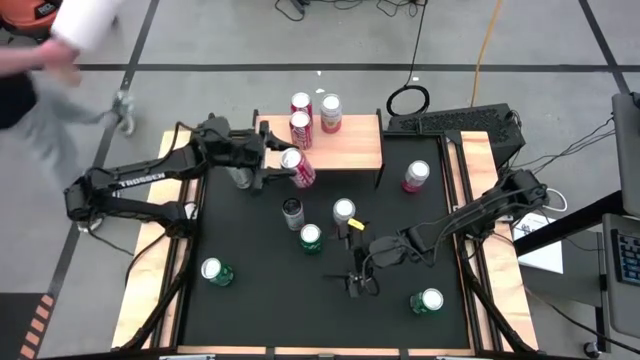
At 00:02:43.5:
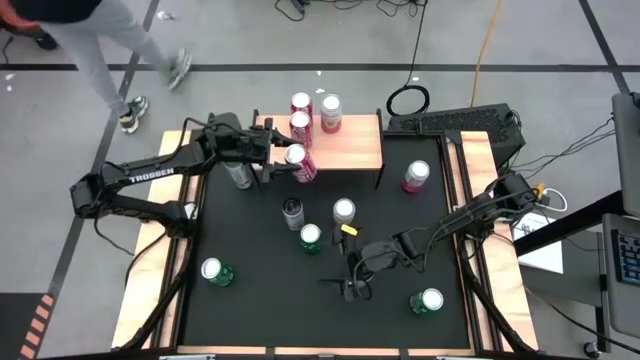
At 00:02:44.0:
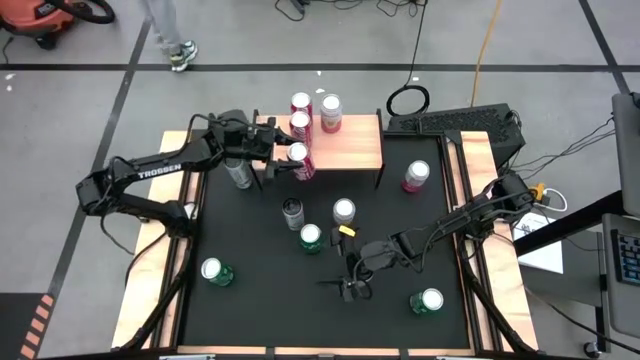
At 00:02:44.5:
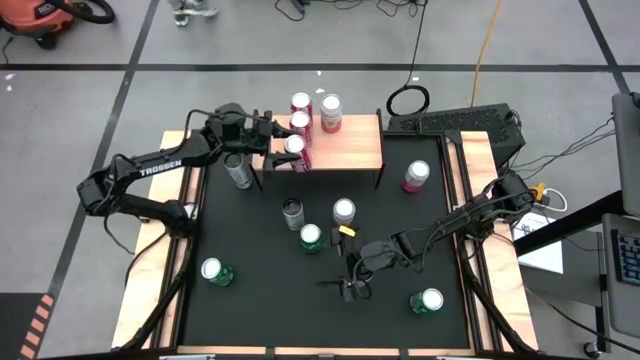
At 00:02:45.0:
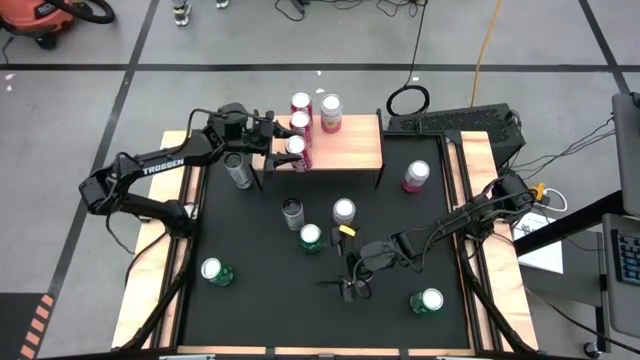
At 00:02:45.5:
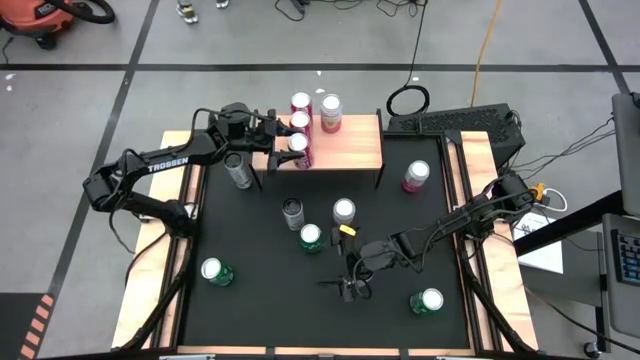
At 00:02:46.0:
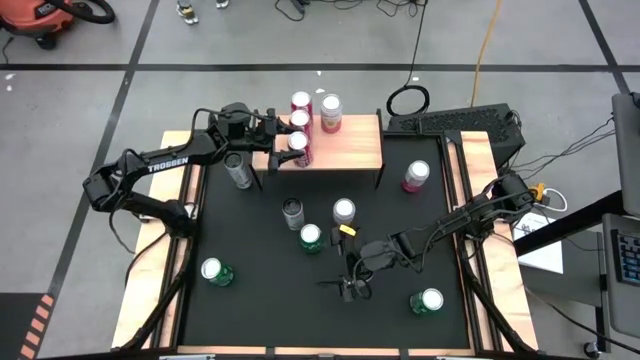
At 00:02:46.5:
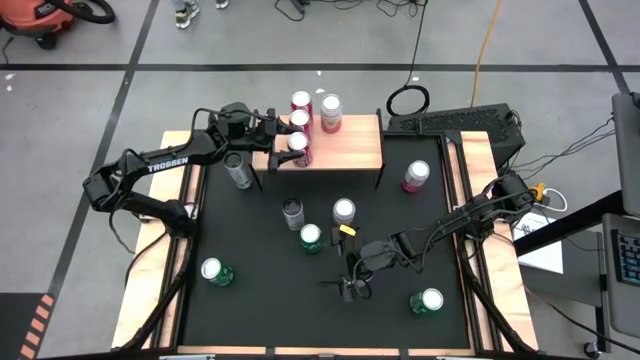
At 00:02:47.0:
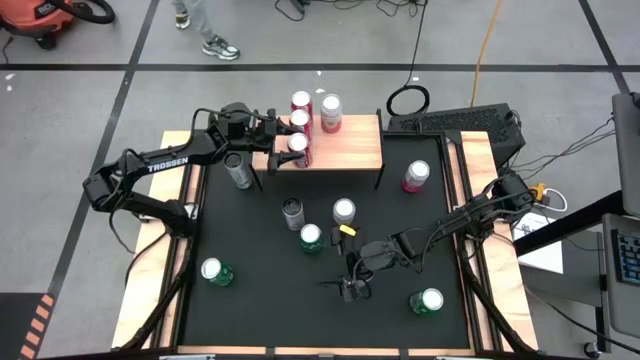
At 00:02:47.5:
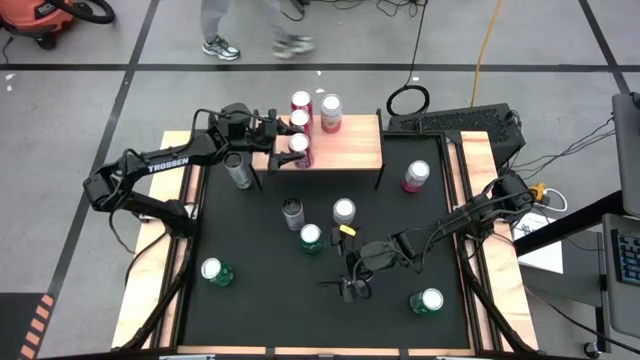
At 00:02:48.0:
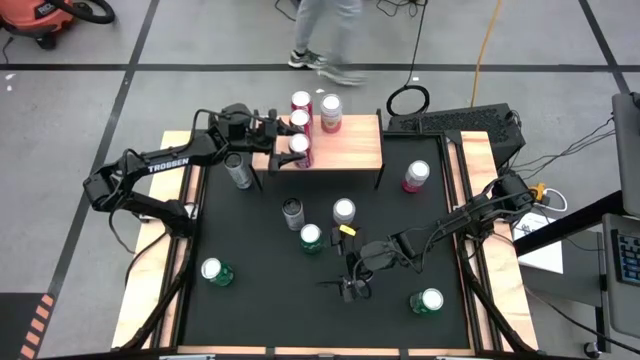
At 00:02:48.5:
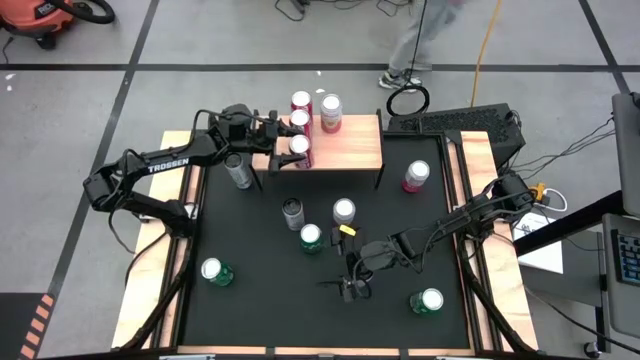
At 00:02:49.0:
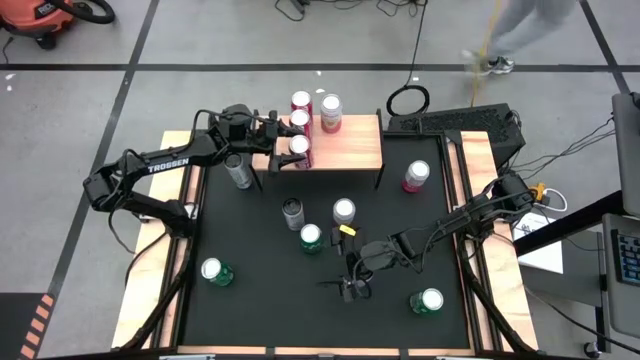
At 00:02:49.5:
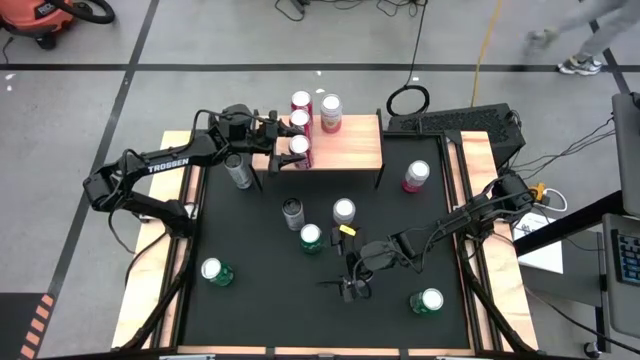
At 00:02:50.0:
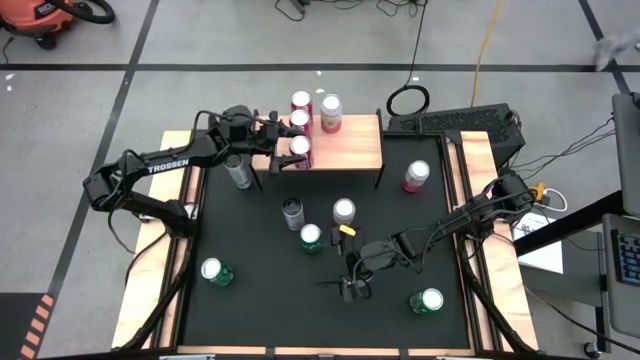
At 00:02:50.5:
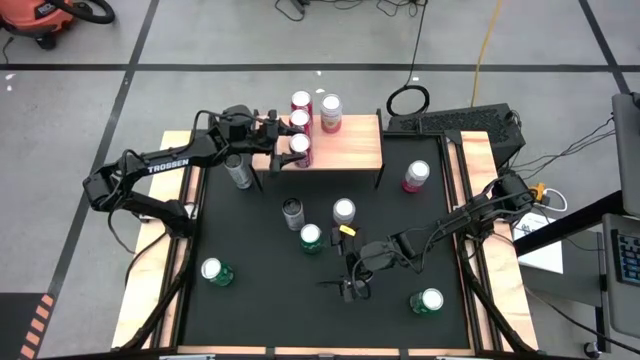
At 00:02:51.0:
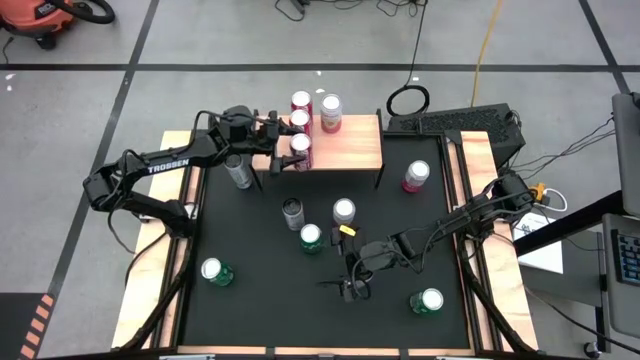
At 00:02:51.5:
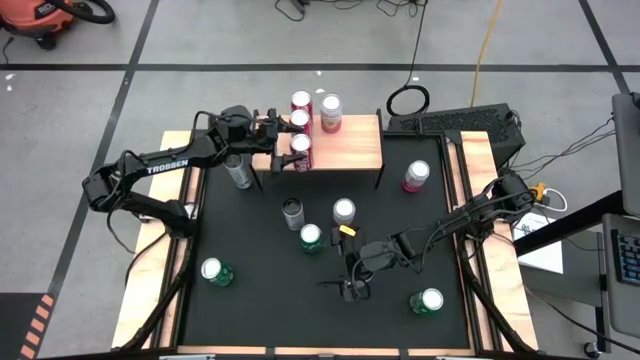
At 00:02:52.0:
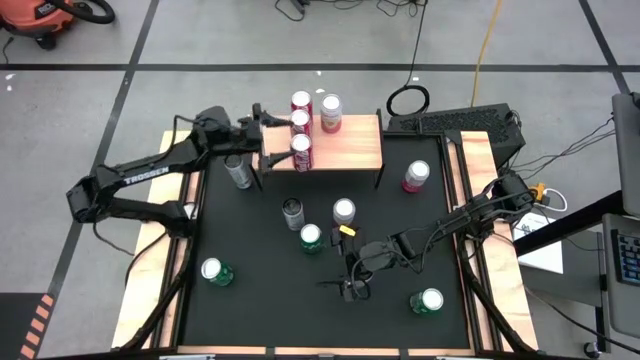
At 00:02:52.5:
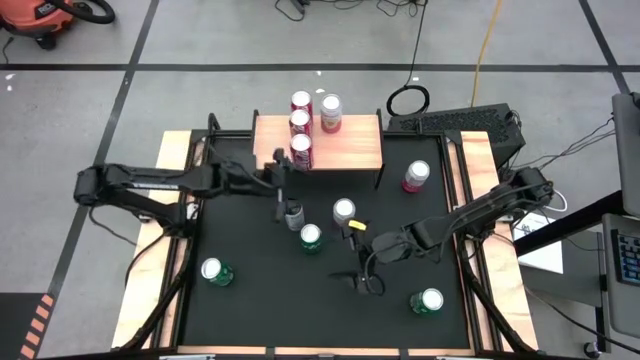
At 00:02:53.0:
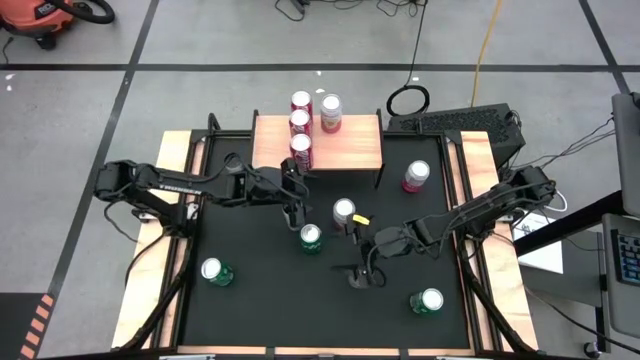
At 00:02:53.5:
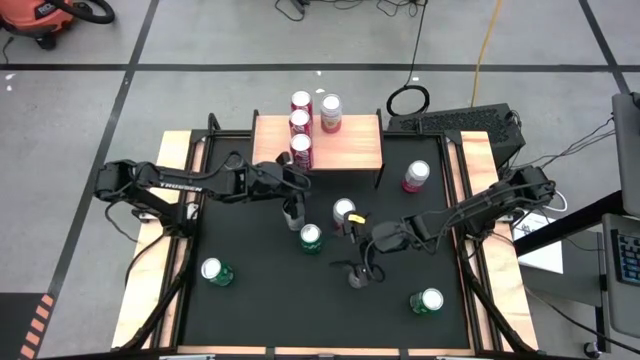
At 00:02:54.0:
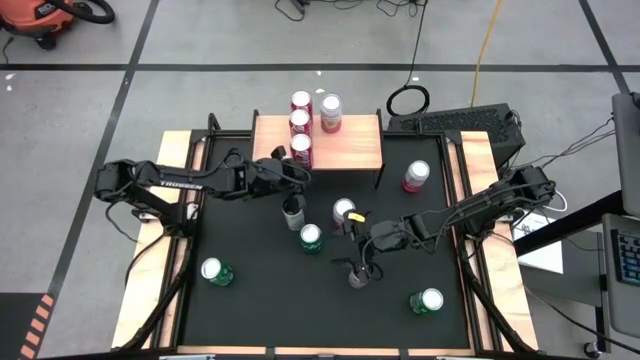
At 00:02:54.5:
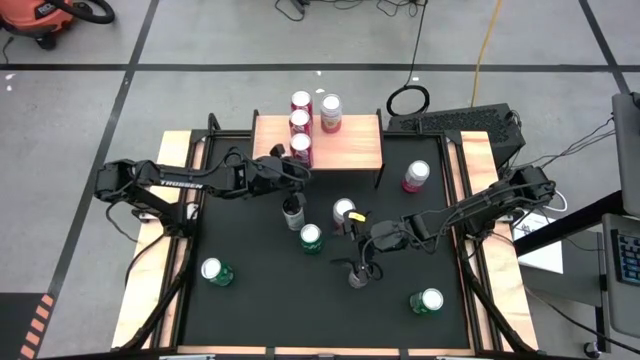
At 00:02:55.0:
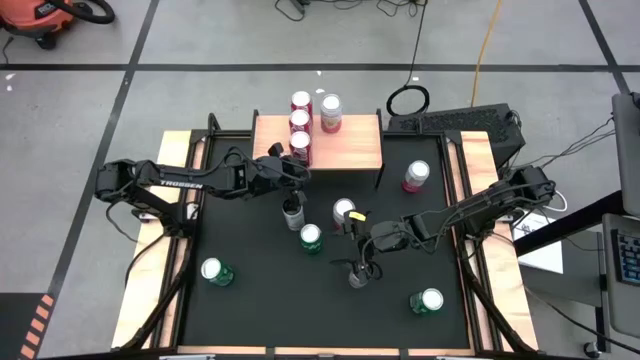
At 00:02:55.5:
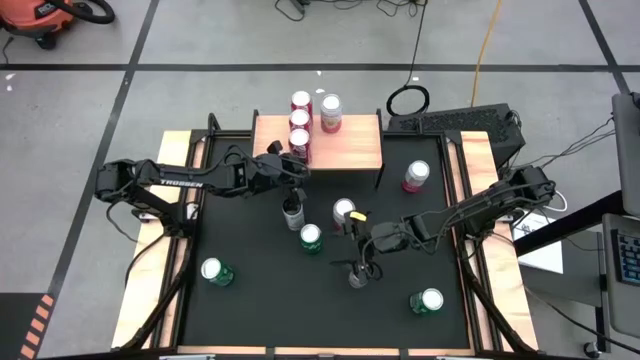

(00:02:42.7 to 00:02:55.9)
Task: Place canned beverage on shelf
Put the red soda can on the shelf aligned with the other red soda cans

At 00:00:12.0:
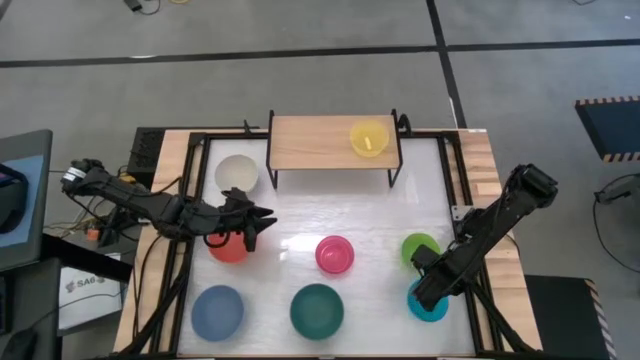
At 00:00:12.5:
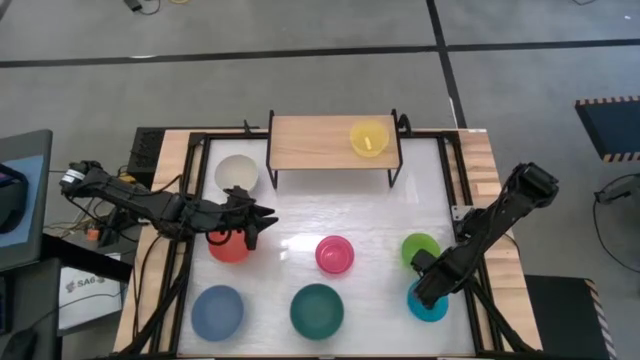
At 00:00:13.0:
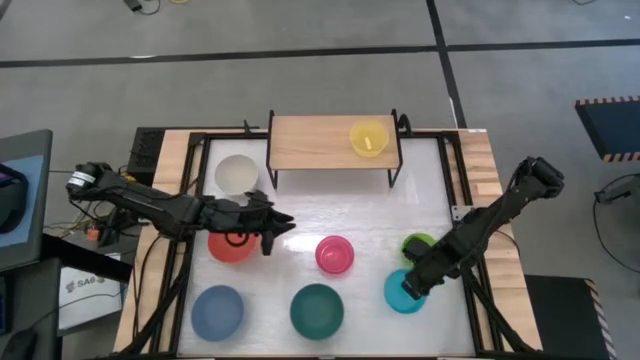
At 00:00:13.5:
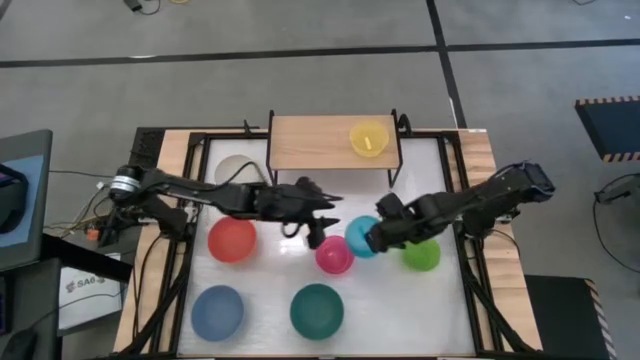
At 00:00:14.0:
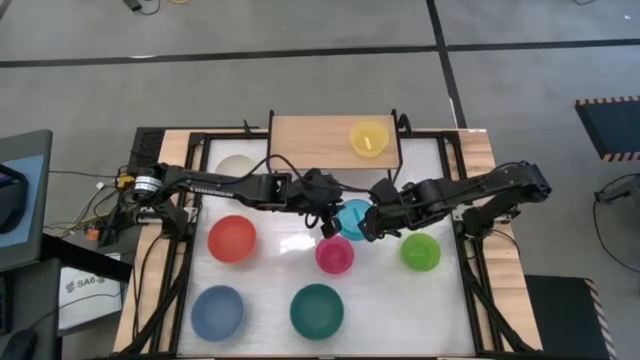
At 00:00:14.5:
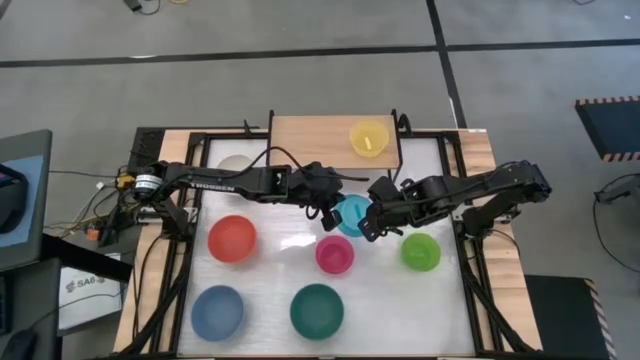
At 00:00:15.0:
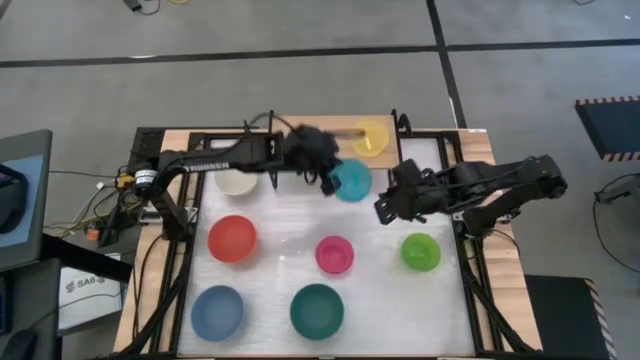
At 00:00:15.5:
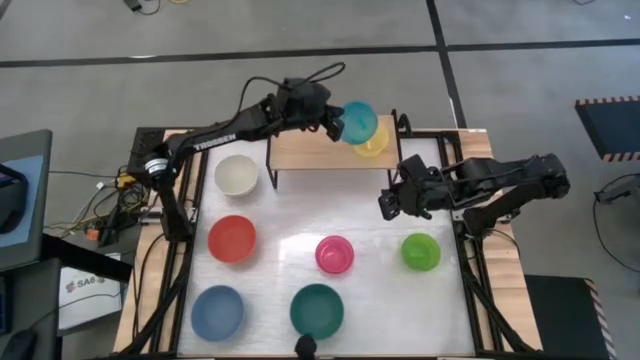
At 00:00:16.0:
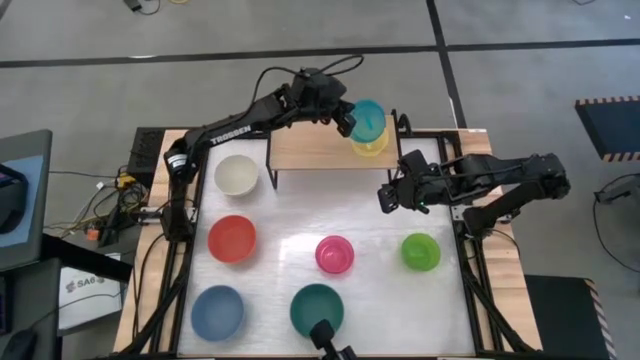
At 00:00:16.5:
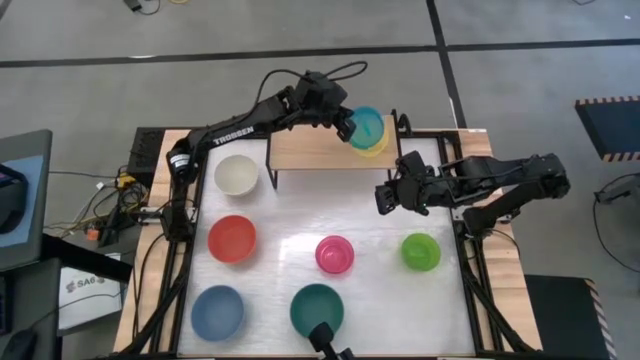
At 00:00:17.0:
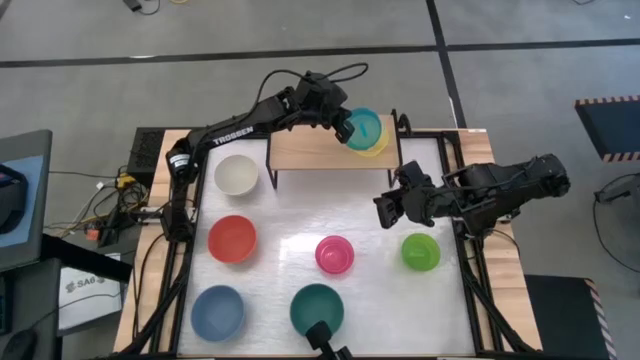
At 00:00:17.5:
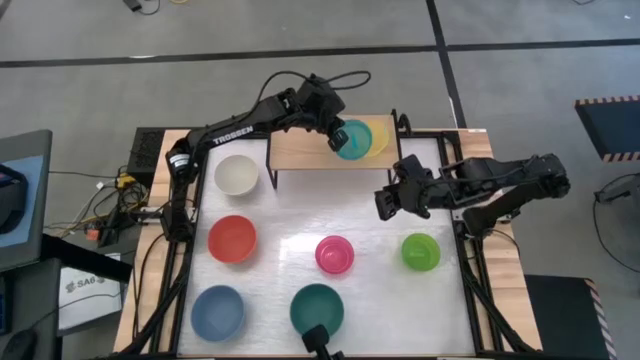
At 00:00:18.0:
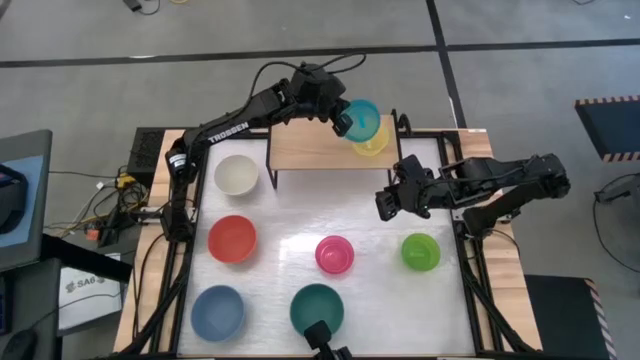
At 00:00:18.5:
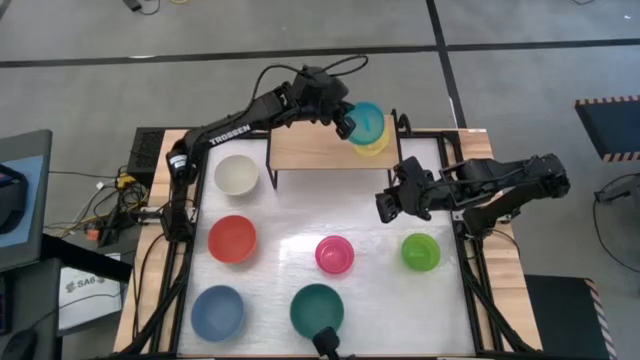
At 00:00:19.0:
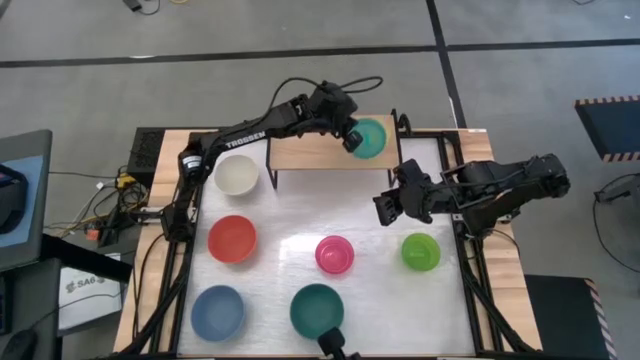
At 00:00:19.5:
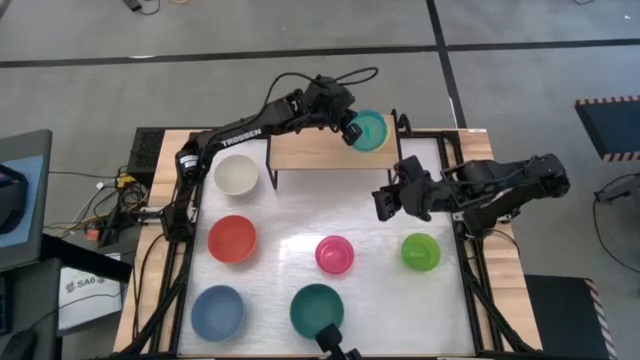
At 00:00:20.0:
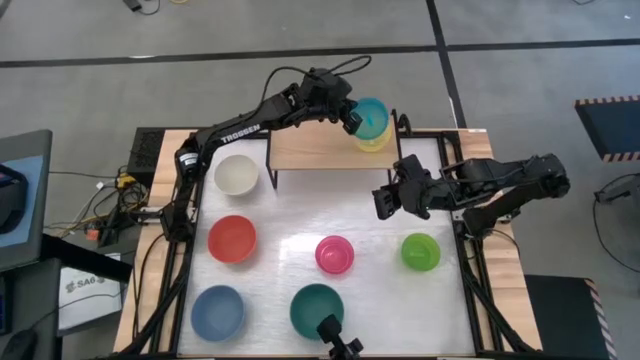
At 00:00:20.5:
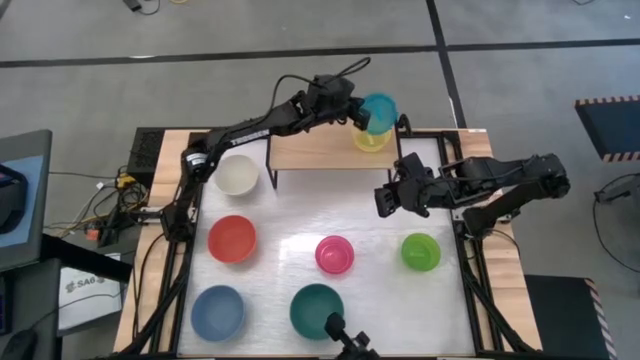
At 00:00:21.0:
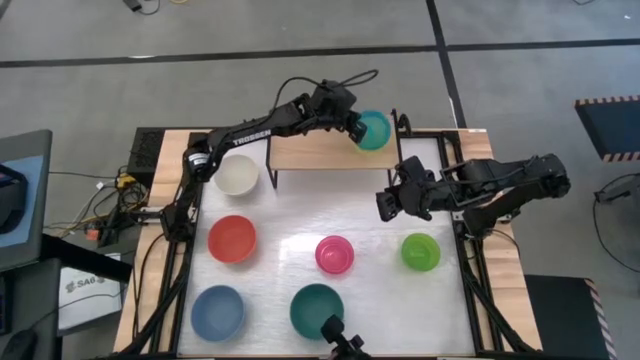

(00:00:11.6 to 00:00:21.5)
Task: Place and stack bowls onto a shelf
Stack the light blue bowl on top of the yellow bowl on the shelf
